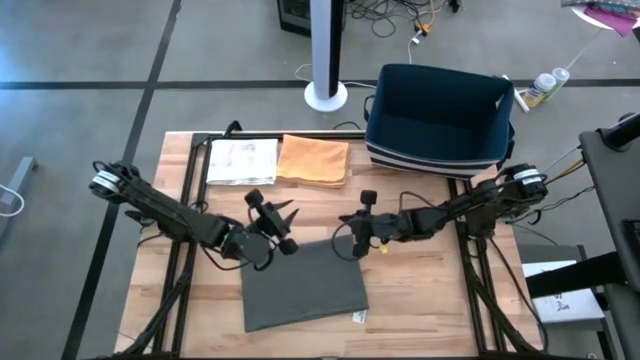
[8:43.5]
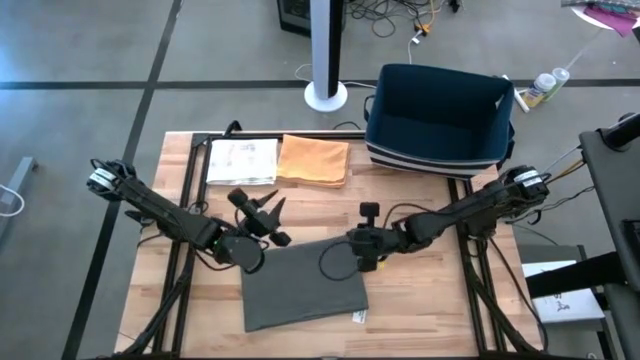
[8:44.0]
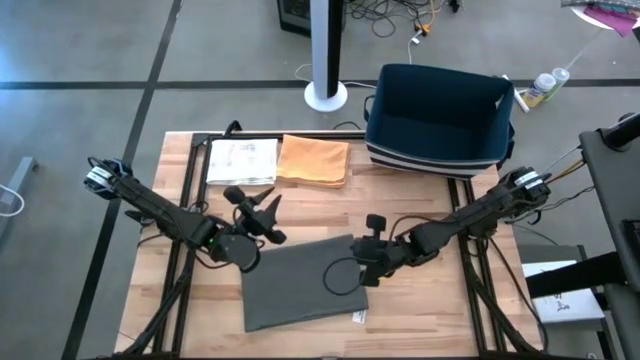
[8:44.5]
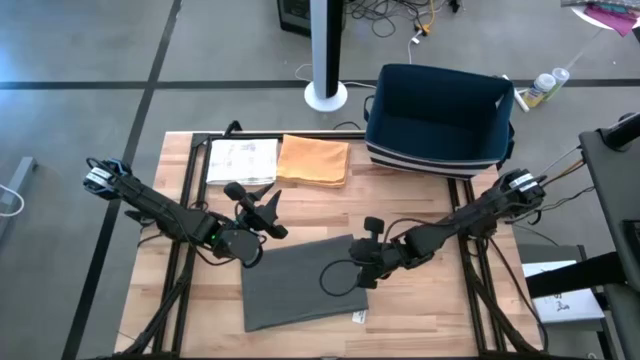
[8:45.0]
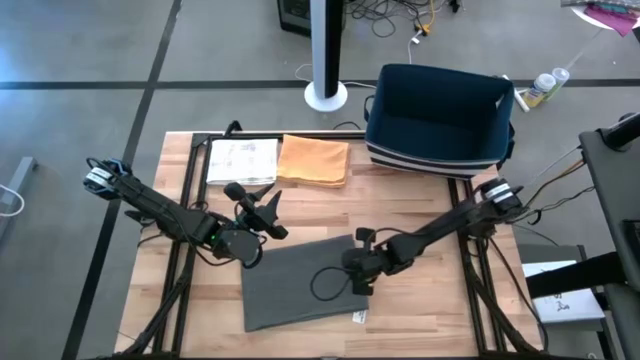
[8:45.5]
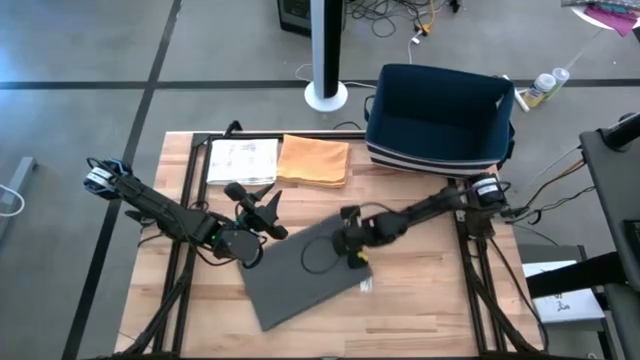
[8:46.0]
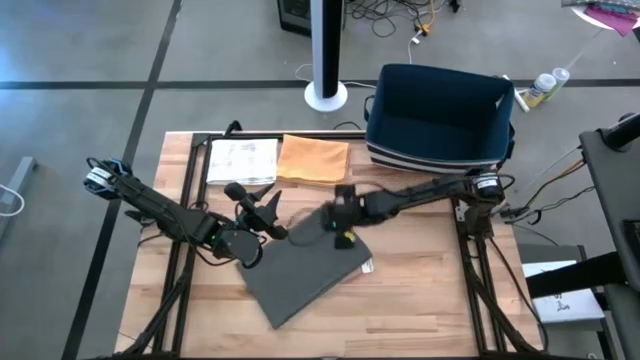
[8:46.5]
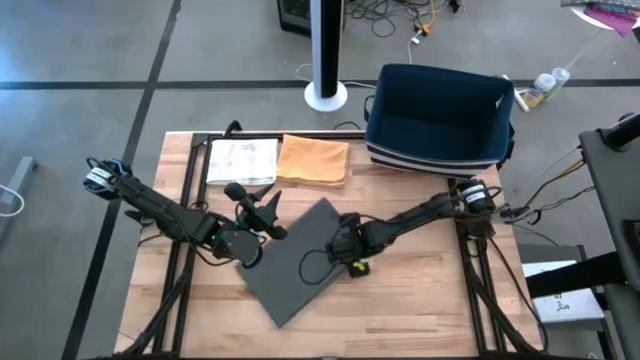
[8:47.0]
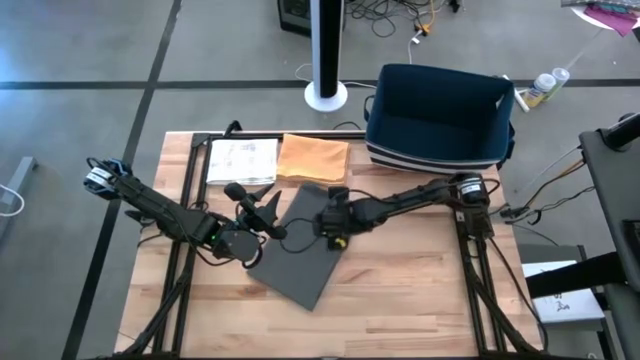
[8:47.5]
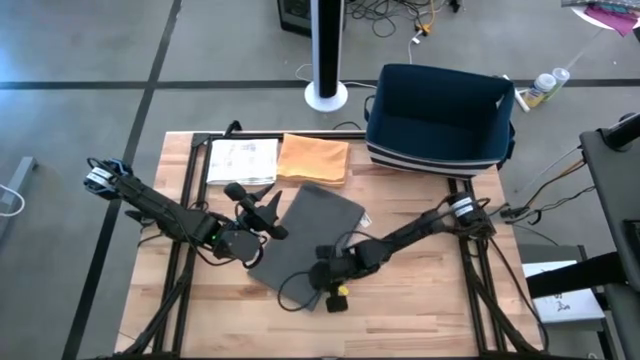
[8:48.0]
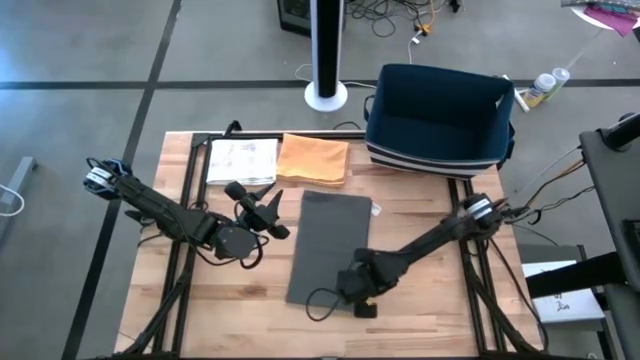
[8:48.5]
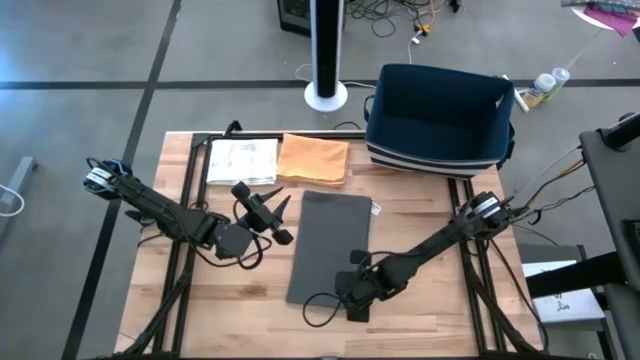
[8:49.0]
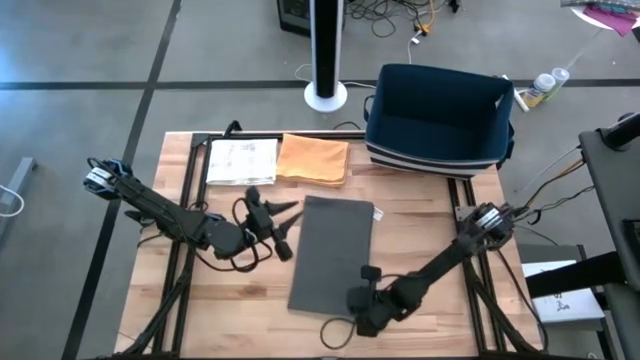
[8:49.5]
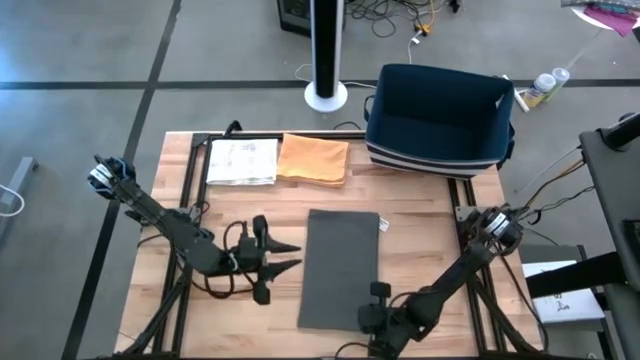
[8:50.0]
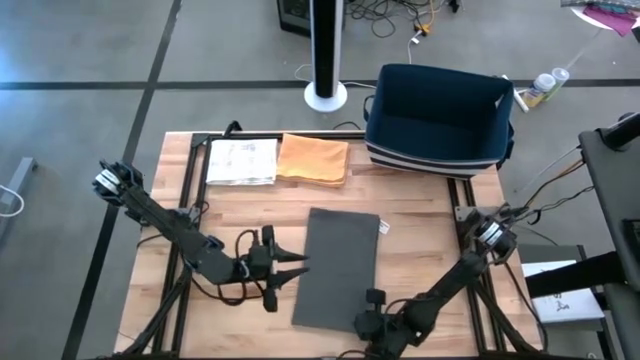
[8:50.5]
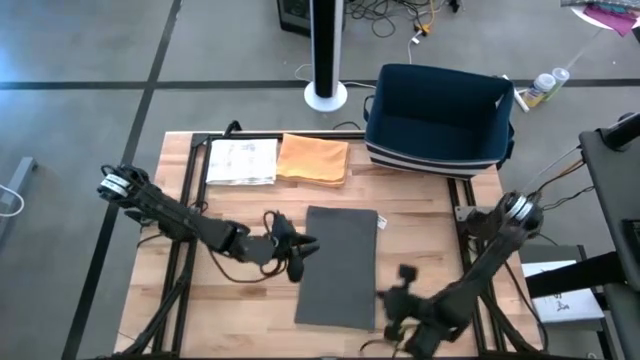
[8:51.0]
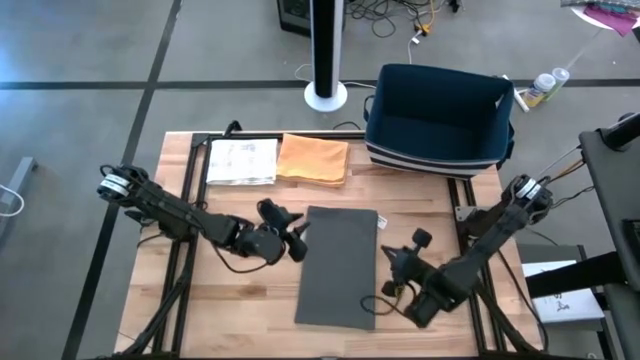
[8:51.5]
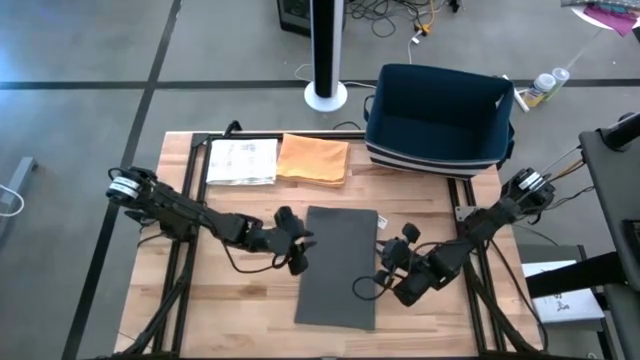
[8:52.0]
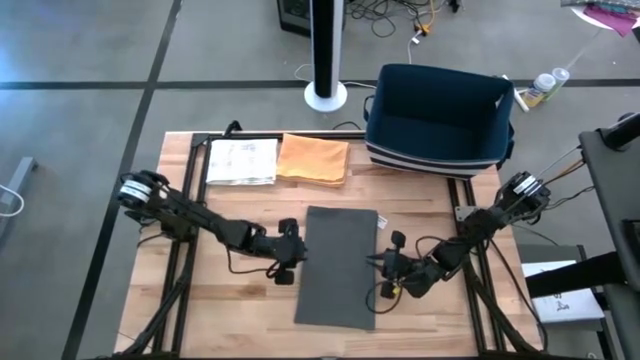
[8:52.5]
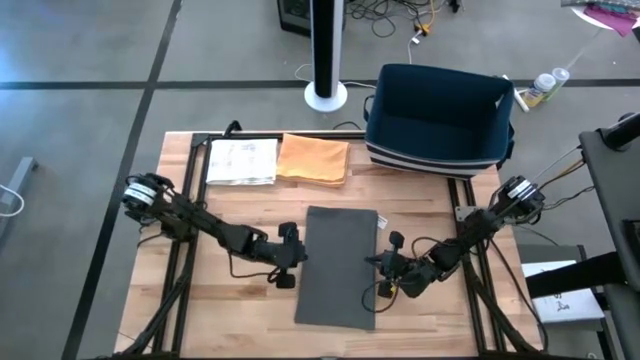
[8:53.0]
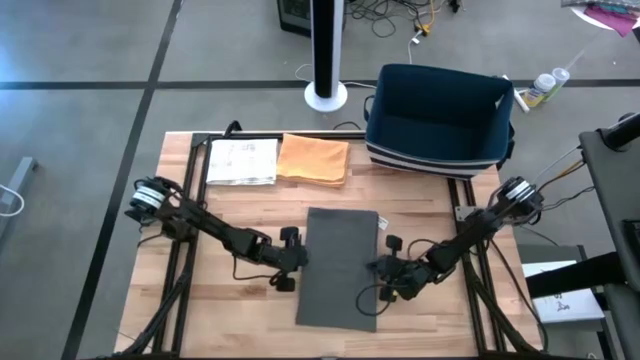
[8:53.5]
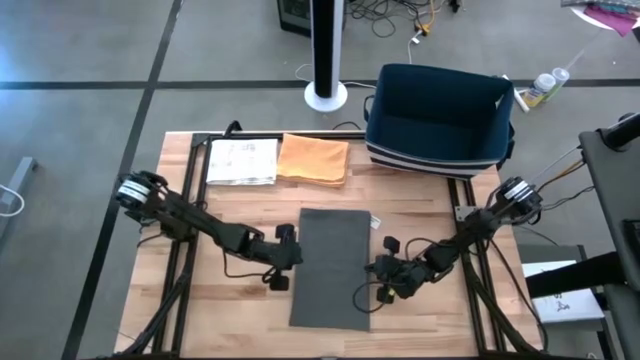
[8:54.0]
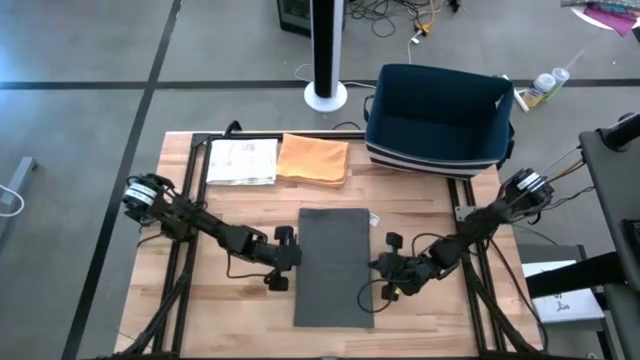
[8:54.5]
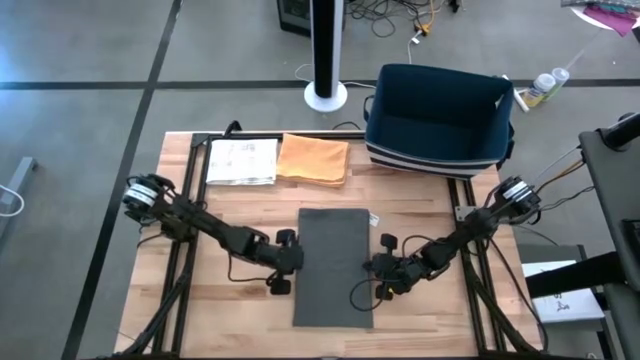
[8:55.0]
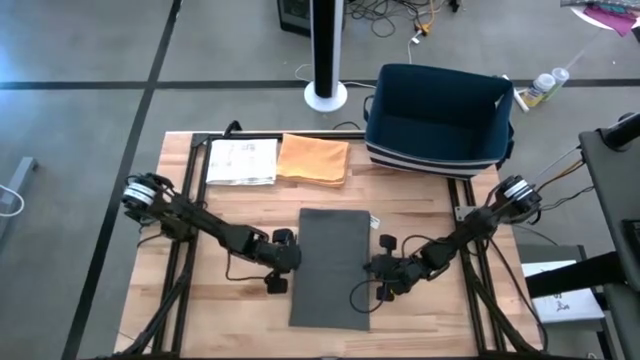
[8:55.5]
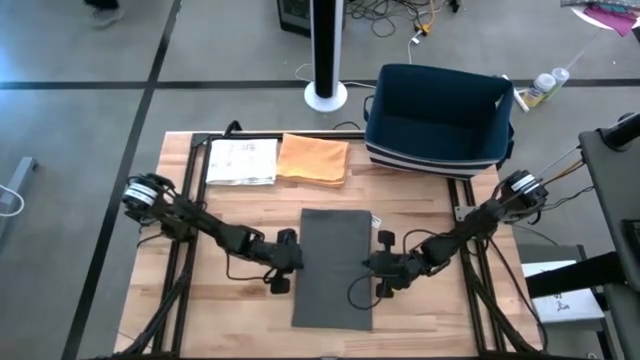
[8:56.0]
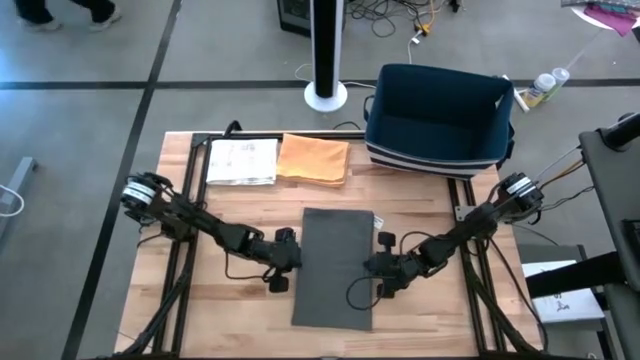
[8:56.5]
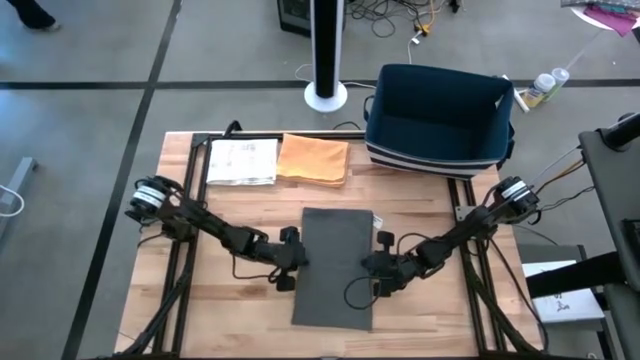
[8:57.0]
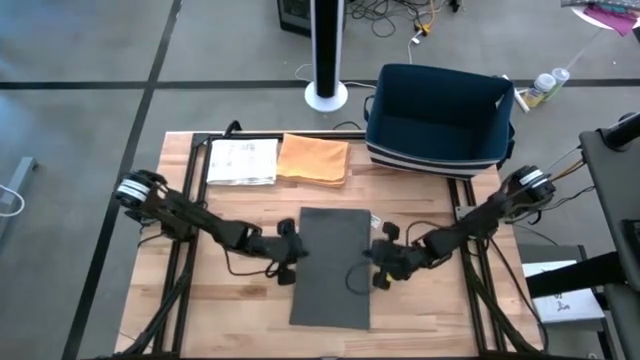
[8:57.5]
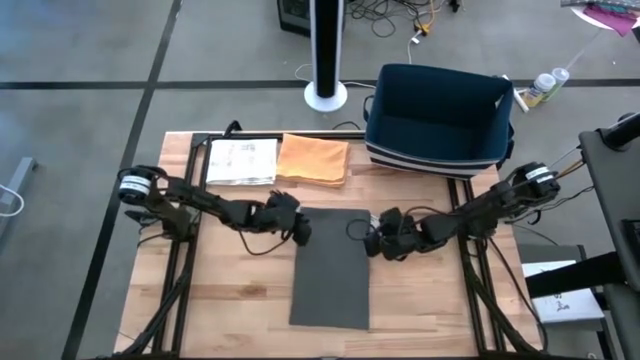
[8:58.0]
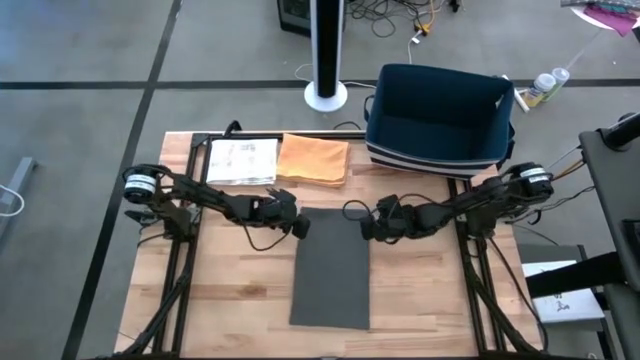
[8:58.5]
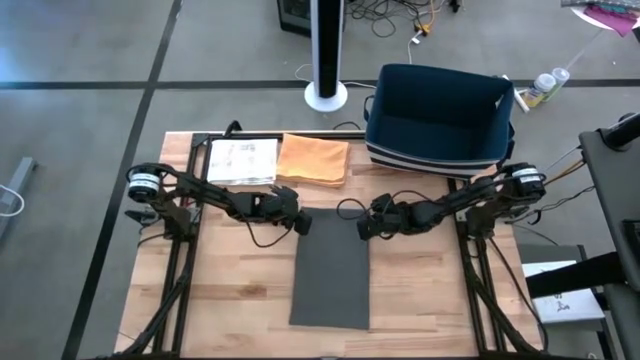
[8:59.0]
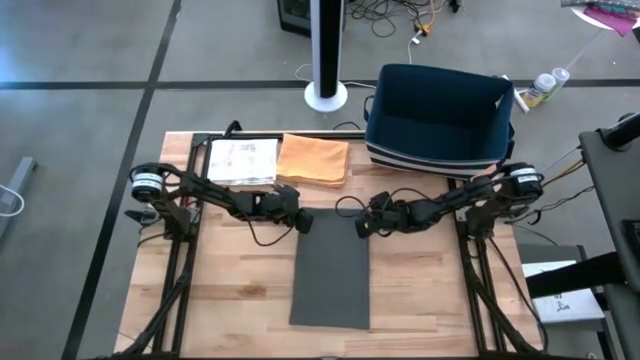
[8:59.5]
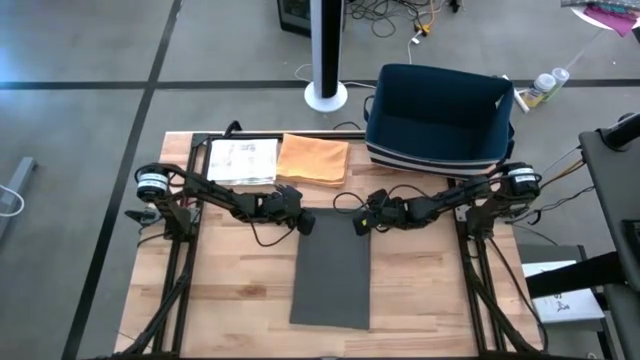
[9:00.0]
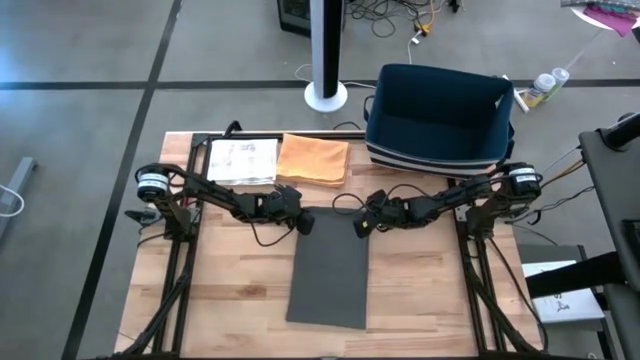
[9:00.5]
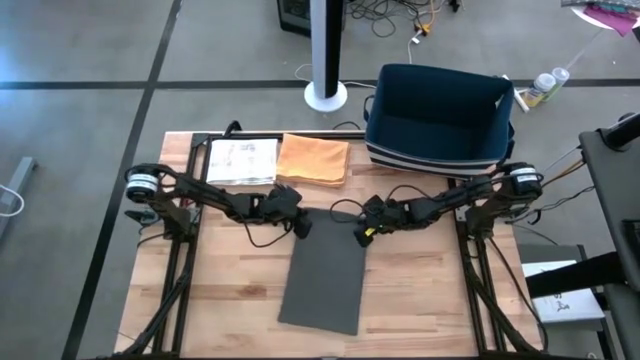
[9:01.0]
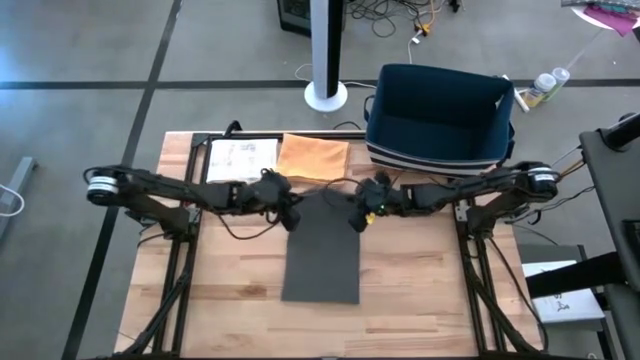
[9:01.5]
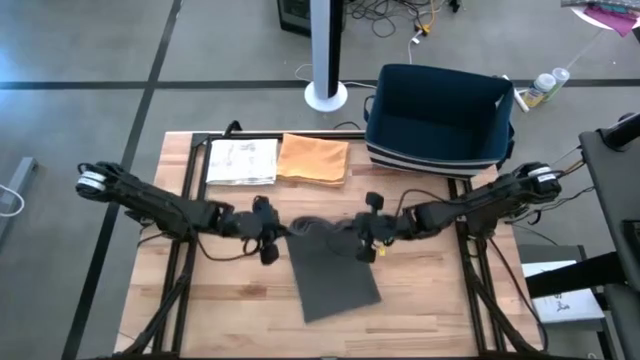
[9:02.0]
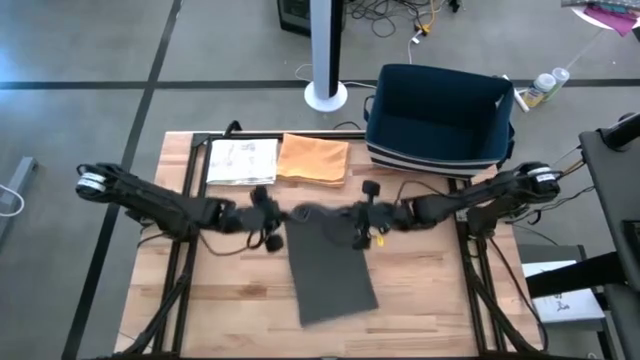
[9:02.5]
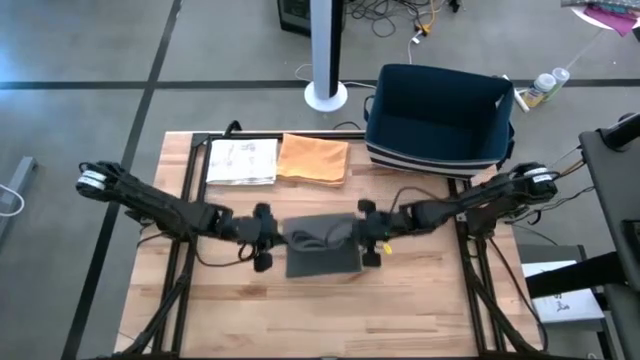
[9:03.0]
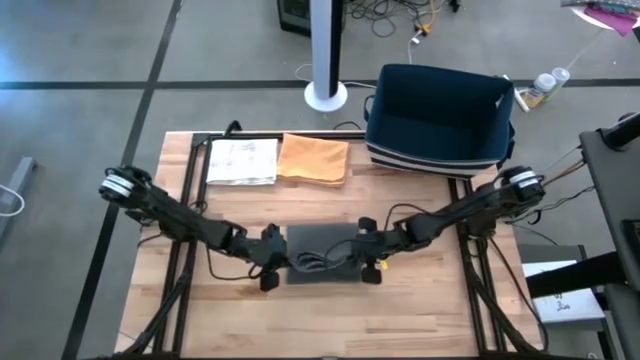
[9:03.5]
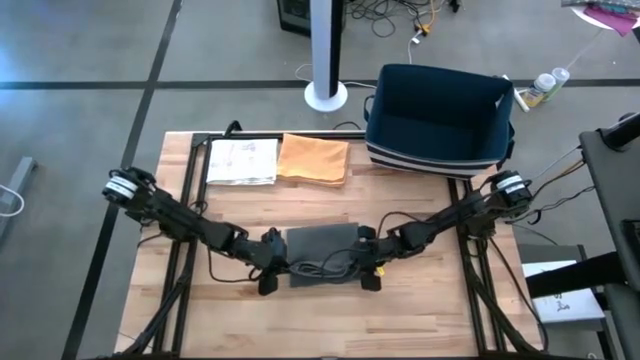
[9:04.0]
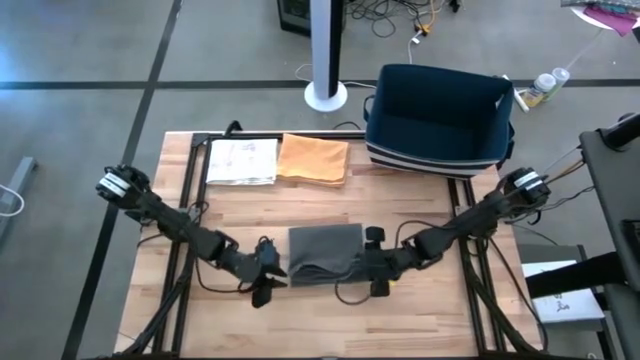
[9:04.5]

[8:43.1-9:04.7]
Task: Fold towel
Fold the black towel
